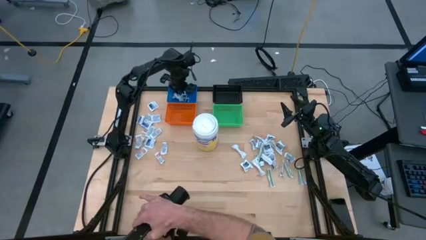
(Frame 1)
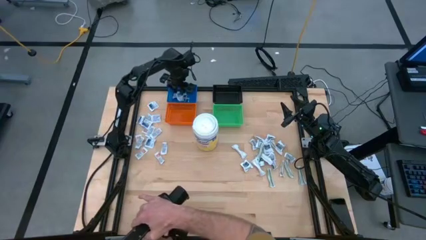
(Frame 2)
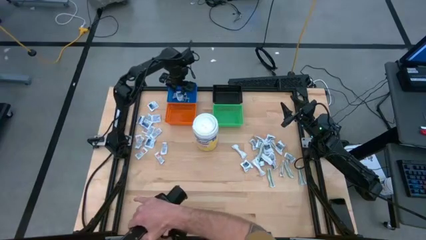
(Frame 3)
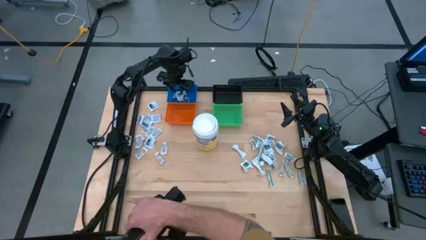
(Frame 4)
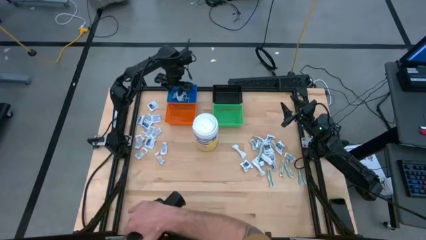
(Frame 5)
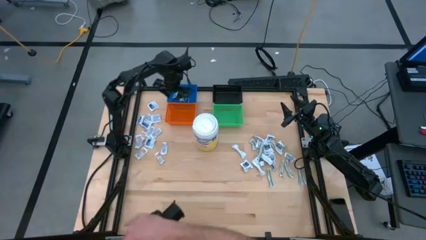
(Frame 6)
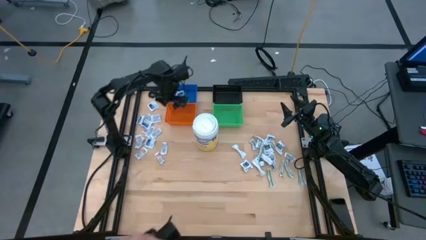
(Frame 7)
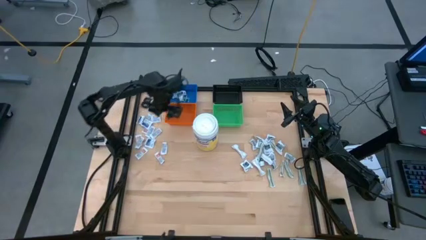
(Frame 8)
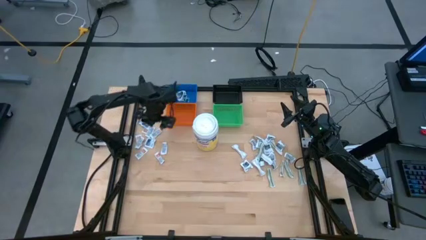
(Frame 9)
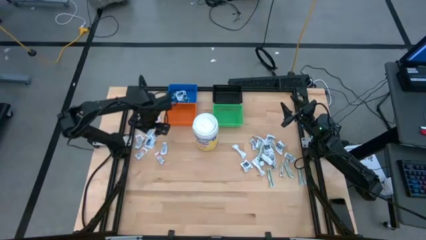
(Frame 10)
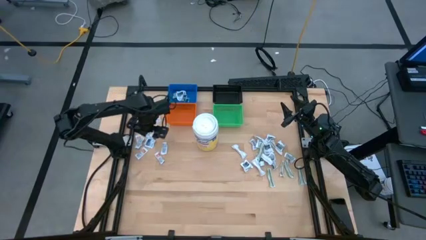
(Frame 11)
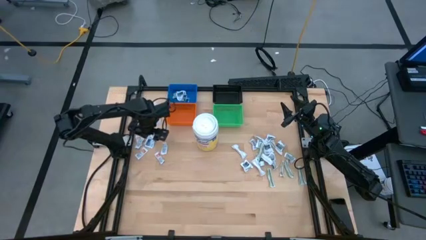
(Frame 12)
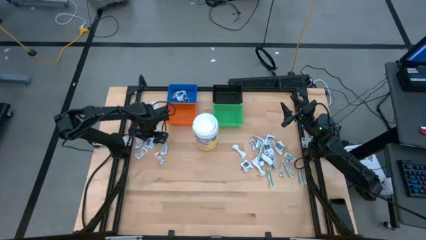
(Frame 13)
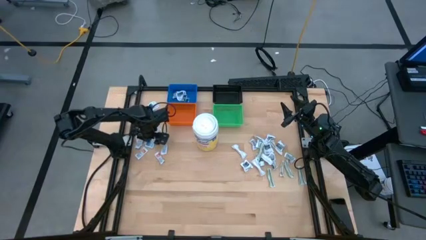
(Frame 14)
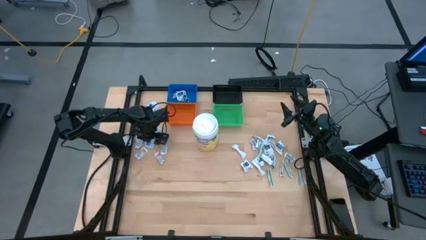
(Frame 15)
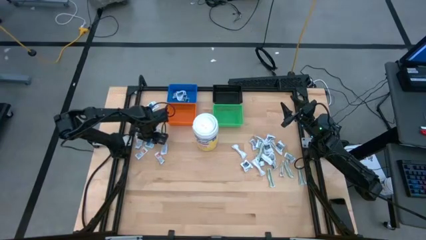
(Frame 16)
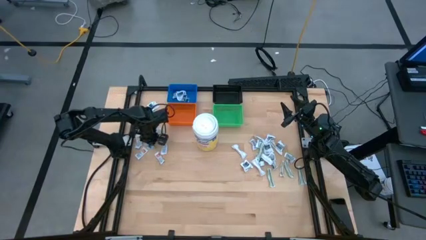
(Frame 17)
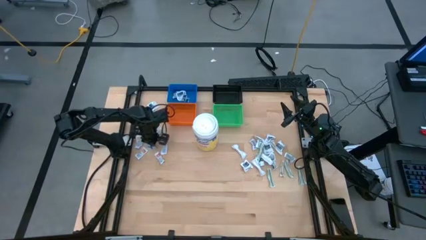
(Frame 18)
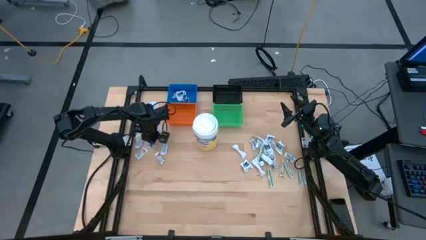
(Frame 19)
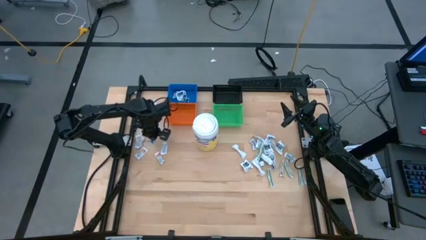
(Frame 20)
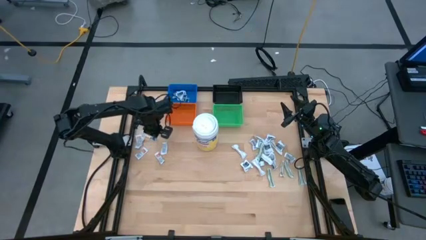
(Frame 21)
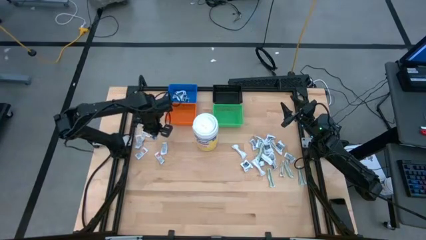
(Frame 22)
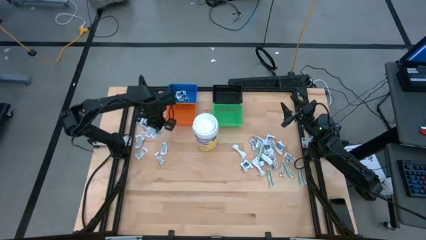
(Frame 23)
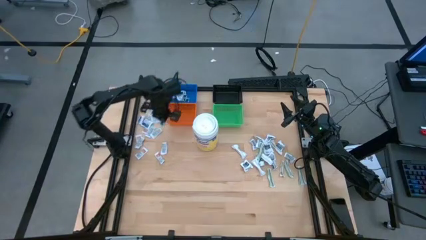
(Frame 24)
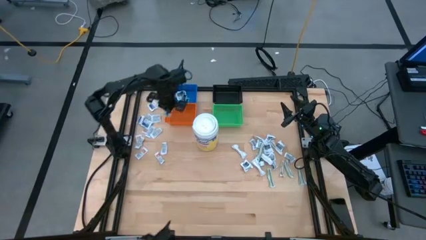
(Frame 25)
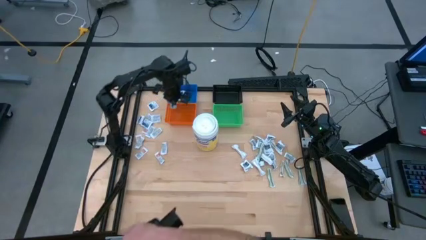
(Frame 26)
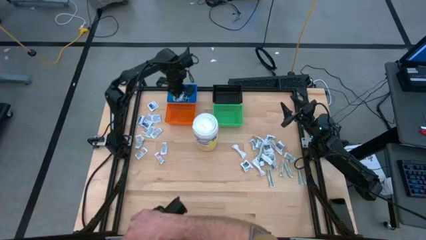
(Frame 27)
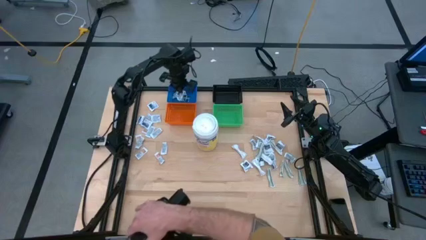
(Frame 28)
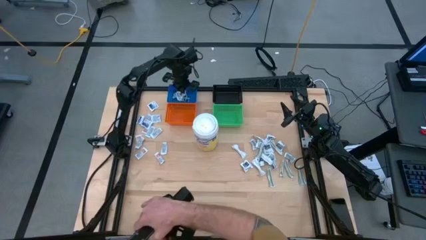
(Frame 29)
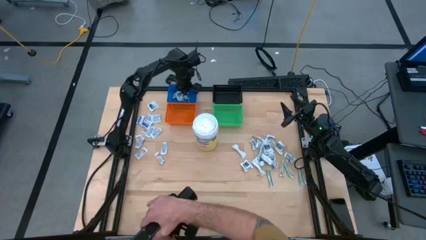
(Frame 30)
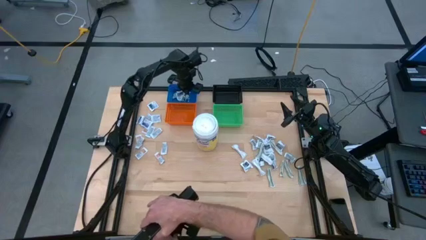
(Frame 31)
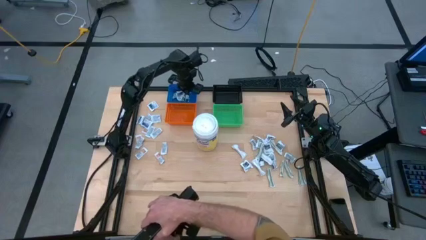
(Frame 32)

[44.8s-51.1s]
Task: Pick & Place First Aid Supplies
Put the blue alcohol pad into the blue bin

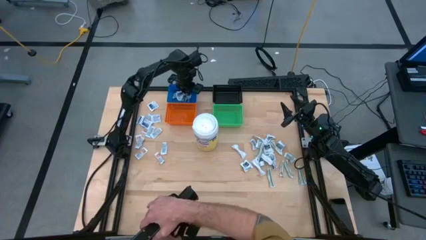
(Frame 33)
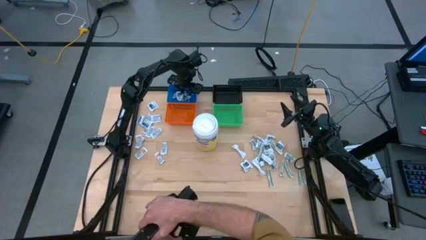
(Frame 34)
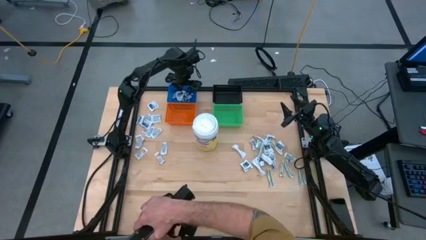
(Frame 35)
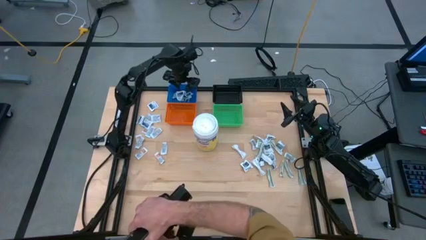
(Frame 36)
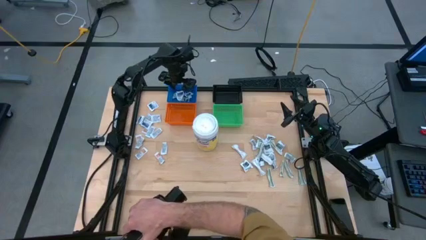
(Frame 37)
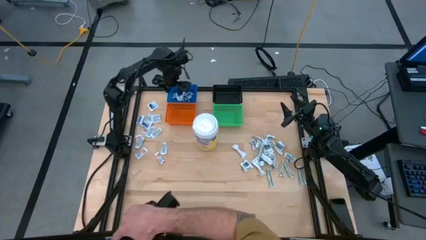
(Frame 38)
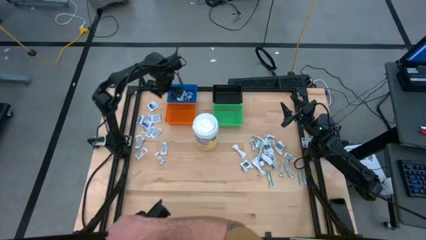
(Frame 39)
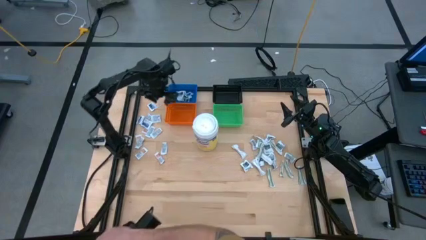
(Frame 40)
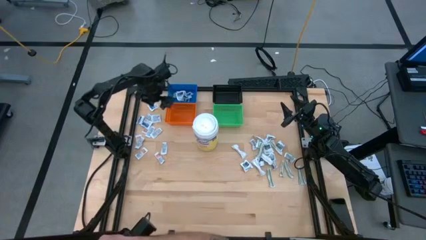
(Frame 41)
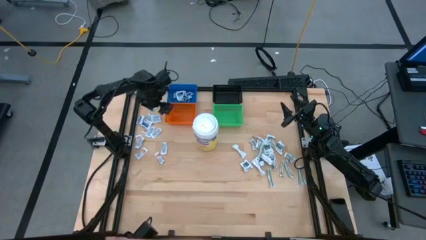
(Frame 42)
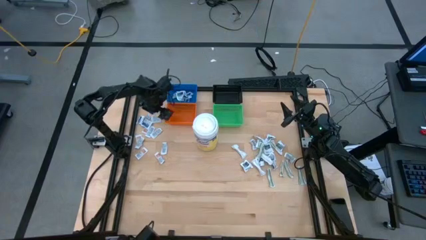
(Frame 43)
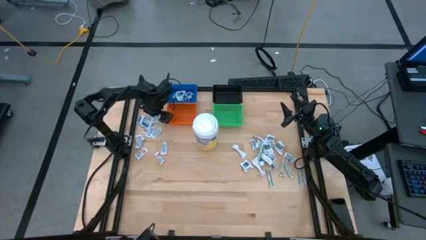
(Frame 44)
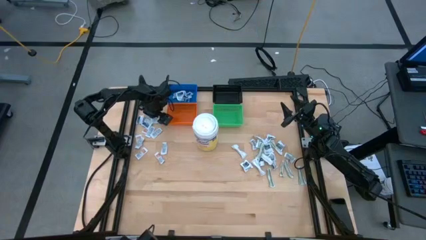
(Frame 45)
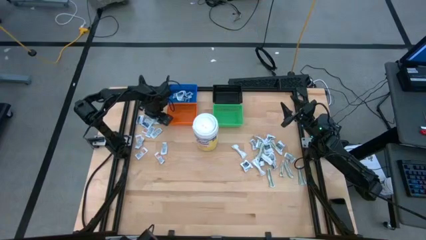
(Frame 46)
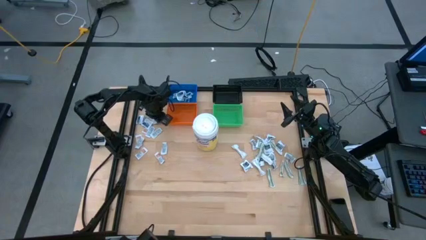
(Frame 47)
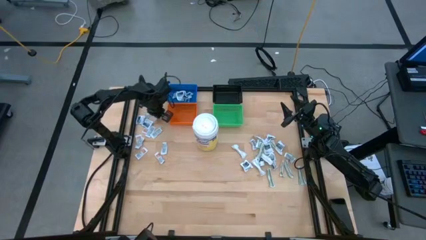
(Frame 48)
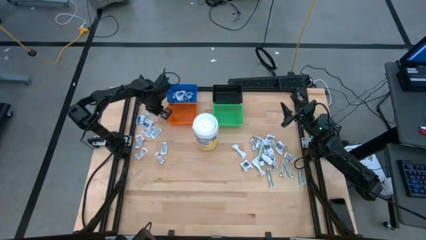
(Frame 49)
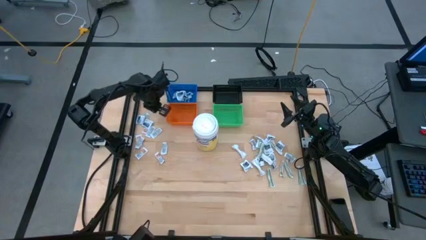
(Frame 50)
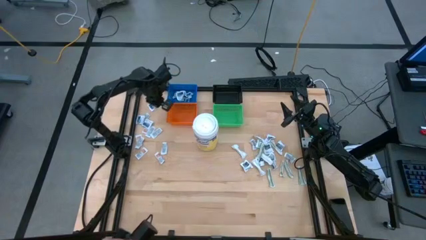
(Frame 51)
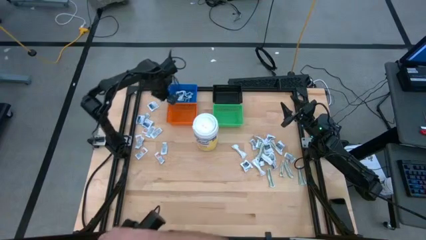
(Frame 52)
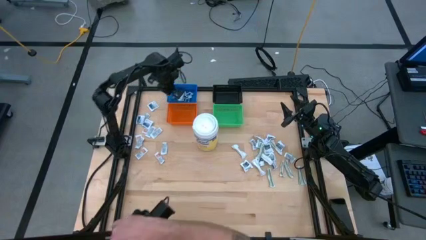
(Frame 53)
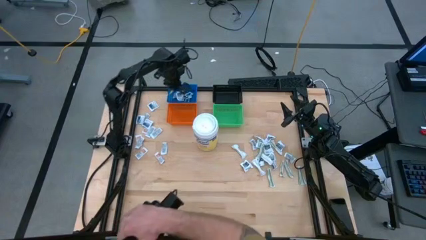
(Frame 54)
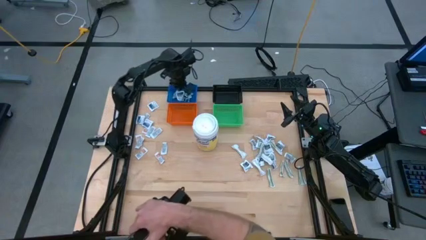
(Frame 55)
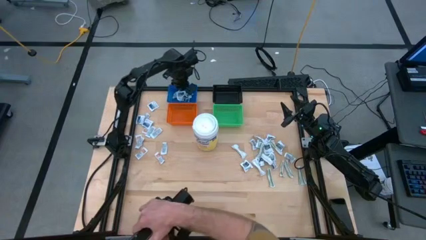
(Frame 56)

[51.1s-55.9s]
Put the blue alcohol pad into the blue bin

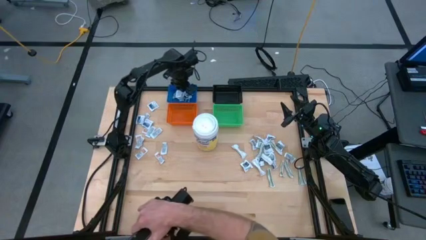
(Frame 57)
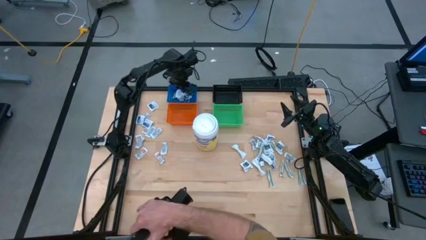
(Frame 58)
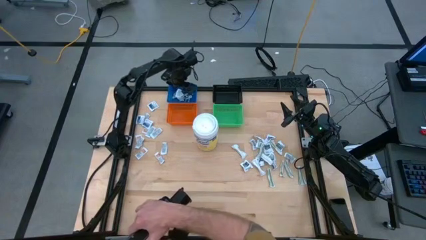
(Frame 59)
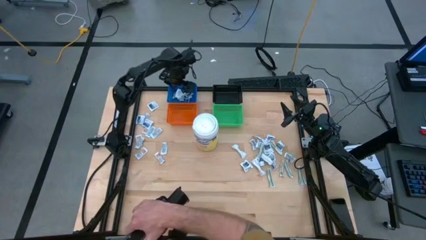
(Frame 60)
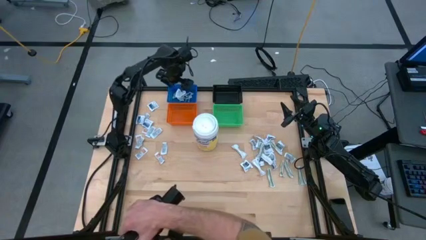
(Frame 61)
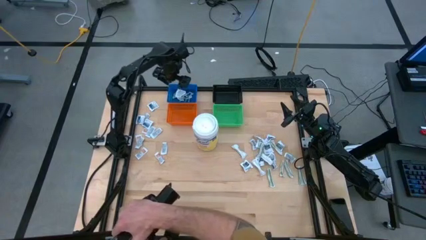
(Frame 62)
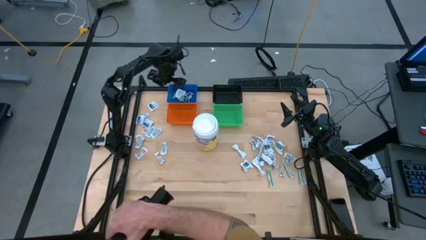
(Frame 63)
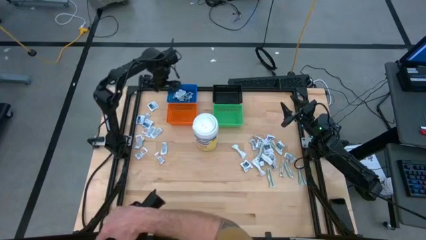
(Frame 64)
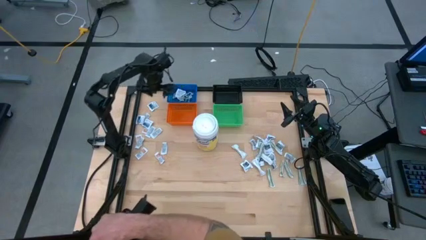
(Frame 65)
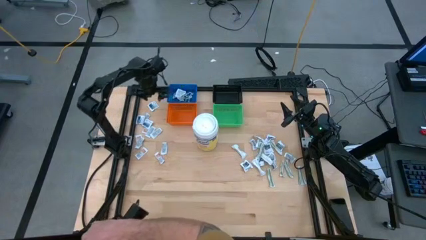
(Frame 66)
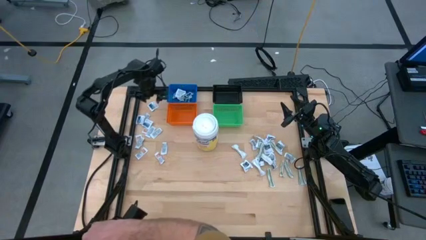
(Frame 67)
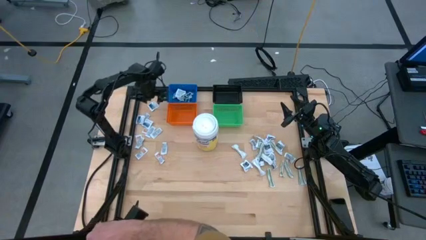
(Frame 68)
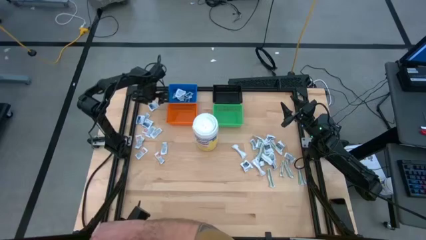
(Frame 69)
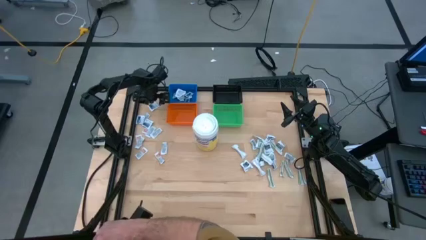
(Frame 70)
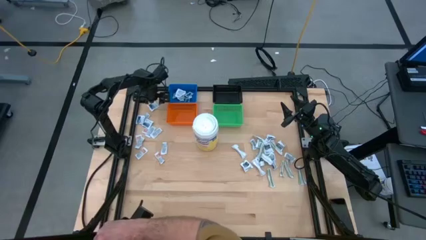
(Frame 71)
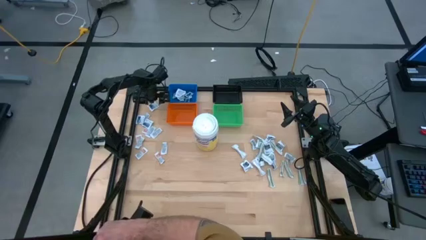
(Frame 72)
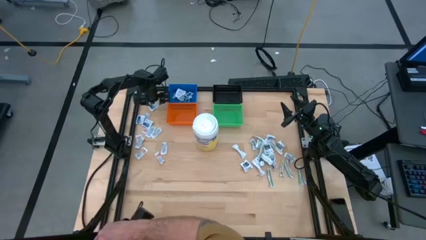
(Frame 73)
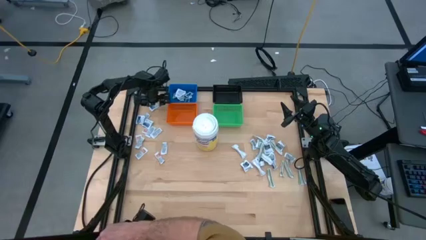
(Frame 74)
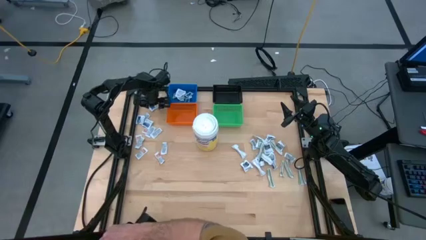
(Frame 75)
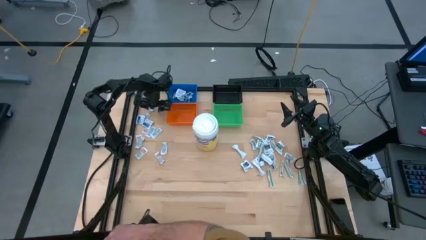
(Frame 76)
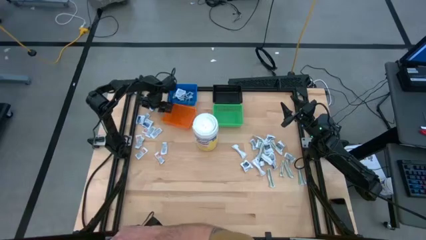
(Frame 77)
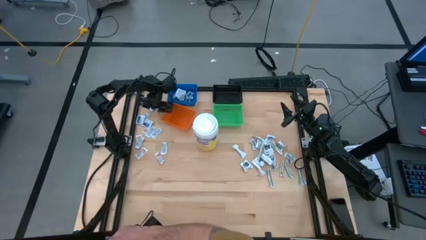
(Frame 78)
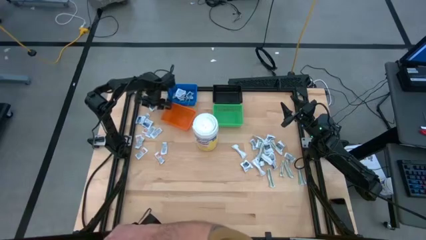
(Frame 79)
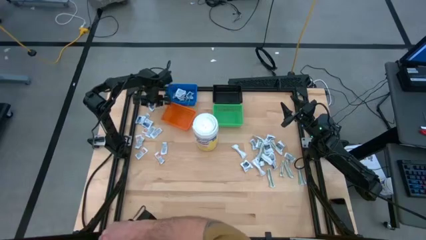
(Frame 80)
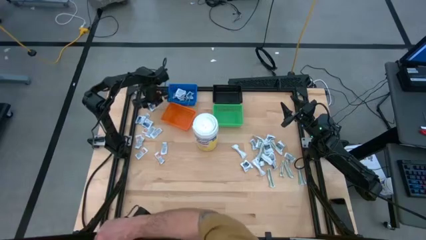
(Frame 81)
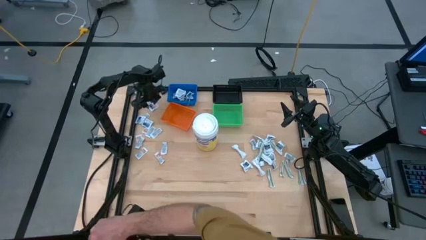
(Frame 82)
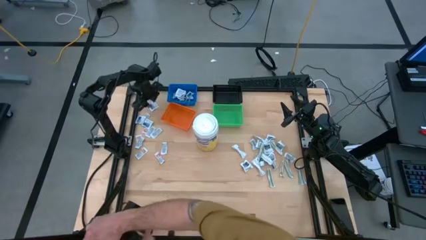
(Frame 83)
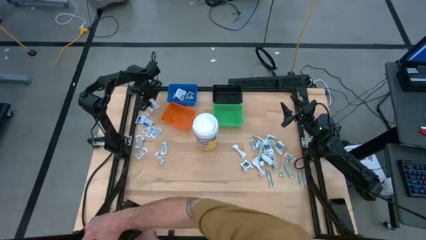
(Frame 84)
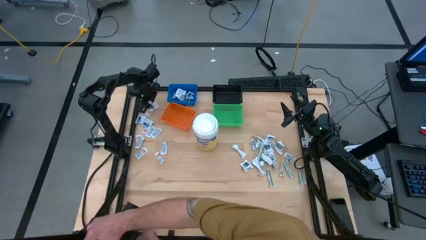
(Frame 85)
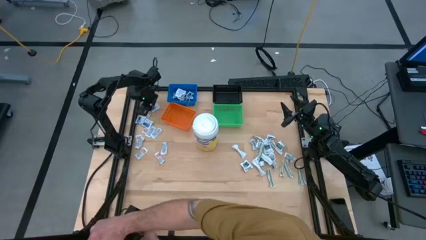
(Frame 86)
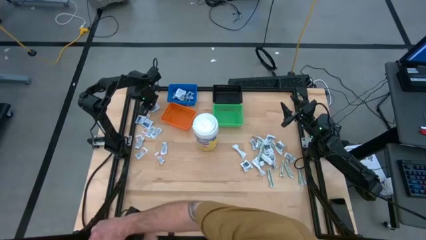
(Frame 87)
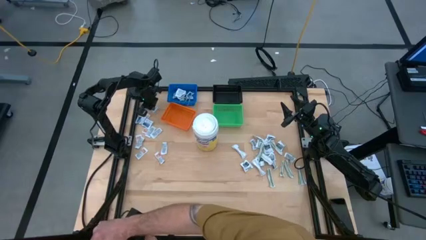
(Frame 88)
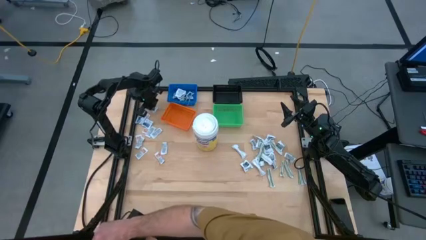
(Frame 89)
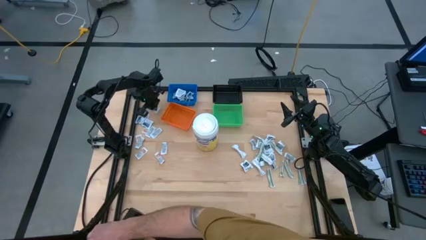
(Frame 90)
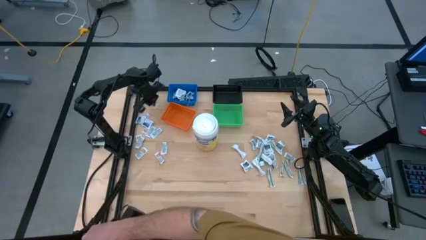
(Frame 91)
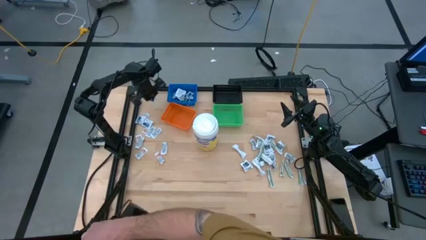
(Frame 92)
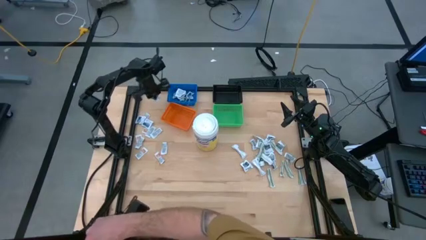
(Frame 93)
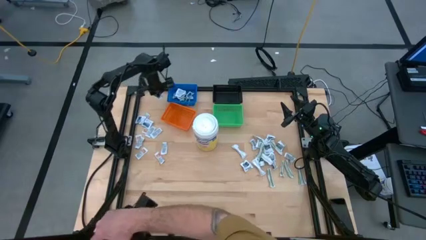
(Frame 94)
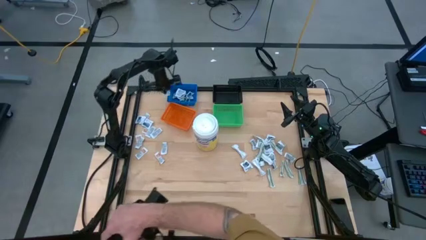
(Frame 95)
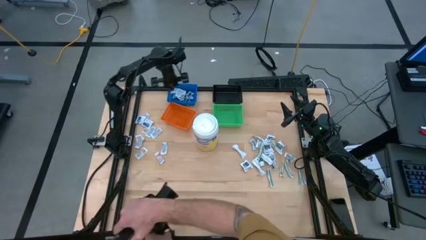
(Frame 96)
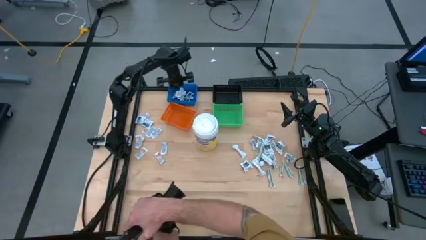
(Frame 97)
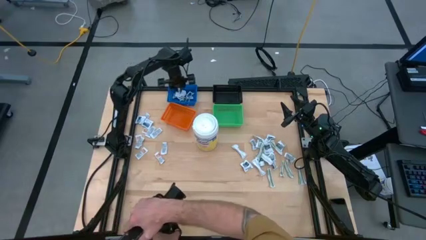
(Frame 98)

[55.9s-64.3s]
Put the blue alcohol pad into the blue bin
